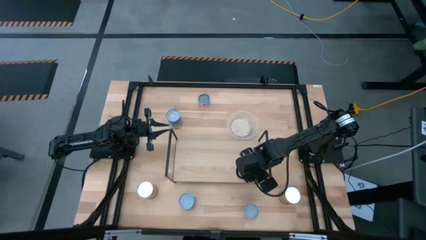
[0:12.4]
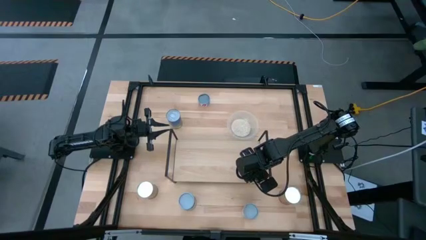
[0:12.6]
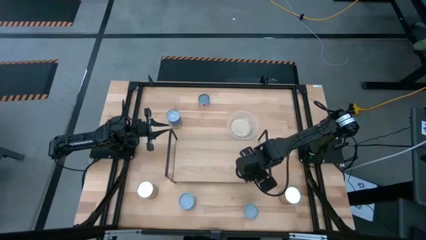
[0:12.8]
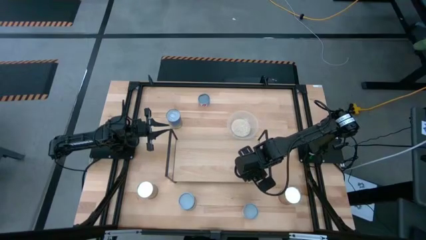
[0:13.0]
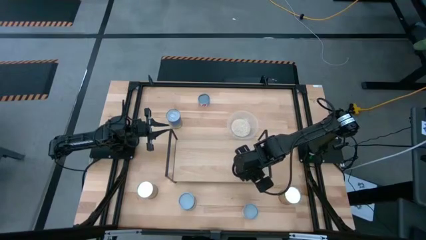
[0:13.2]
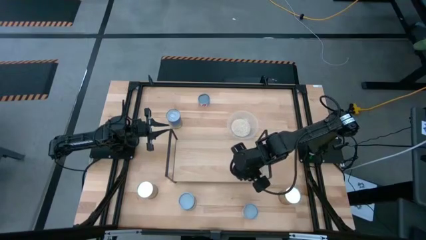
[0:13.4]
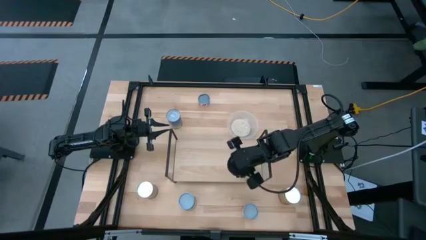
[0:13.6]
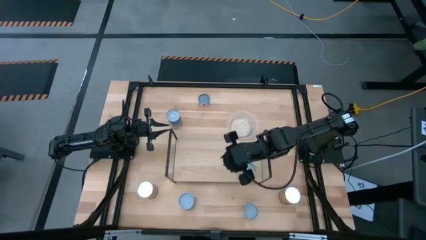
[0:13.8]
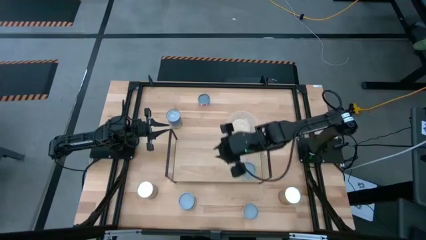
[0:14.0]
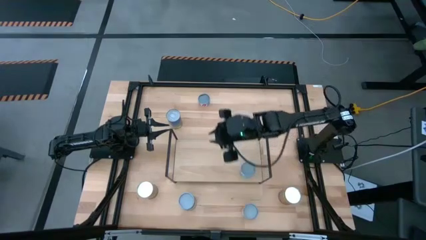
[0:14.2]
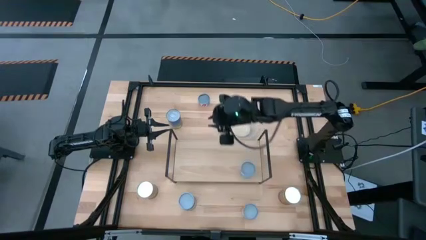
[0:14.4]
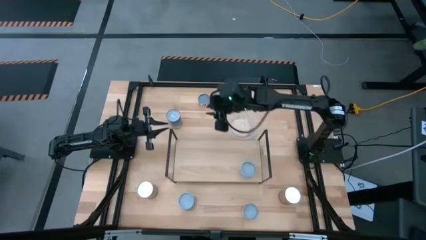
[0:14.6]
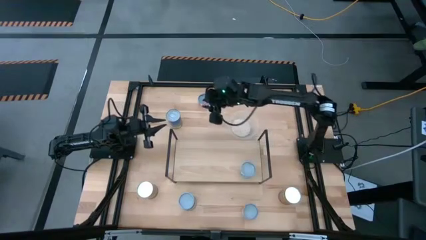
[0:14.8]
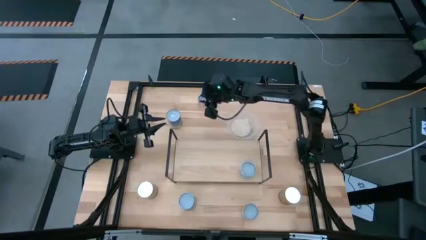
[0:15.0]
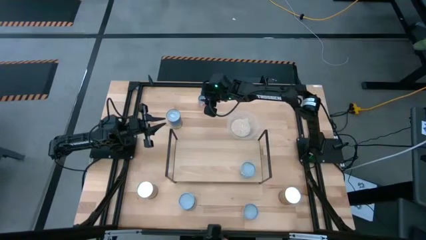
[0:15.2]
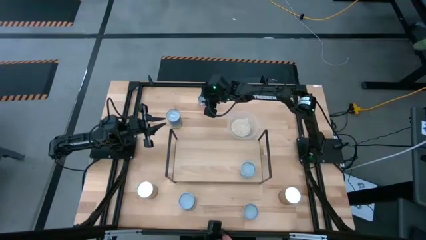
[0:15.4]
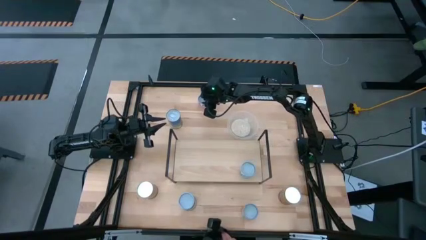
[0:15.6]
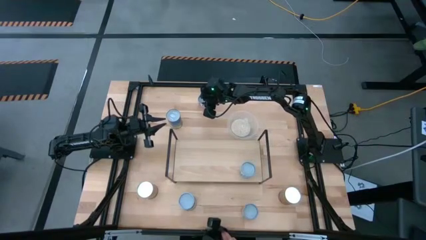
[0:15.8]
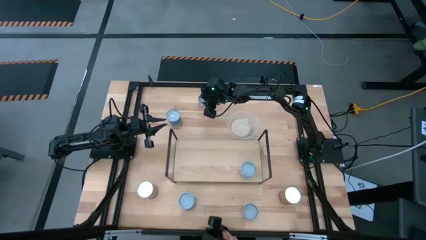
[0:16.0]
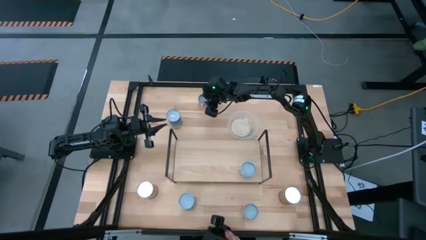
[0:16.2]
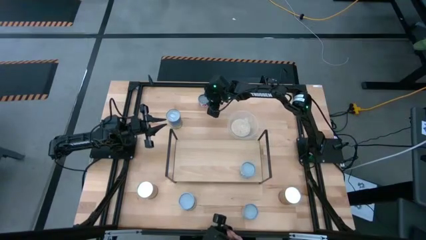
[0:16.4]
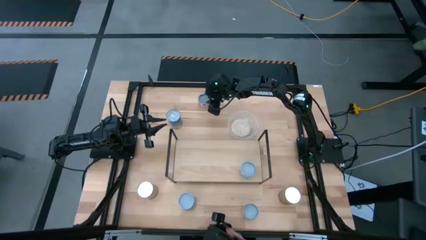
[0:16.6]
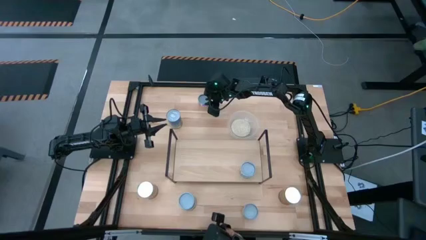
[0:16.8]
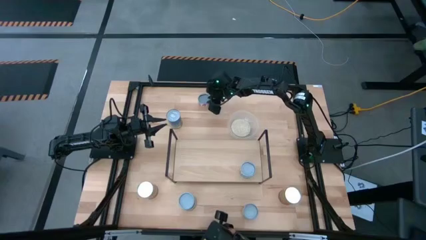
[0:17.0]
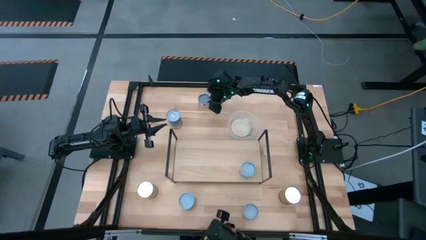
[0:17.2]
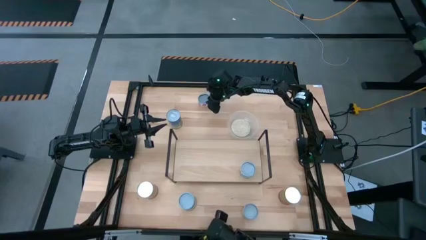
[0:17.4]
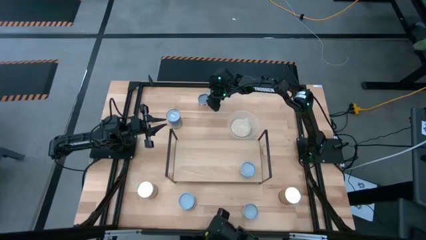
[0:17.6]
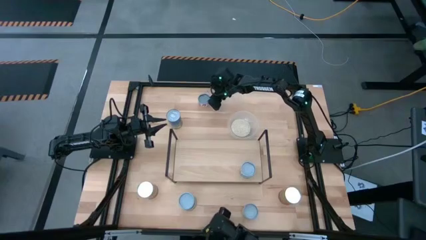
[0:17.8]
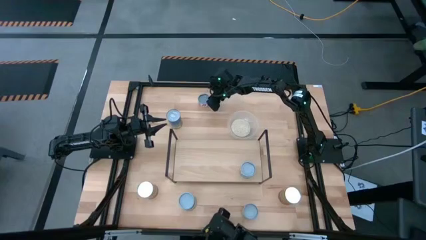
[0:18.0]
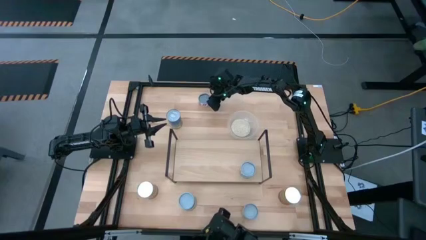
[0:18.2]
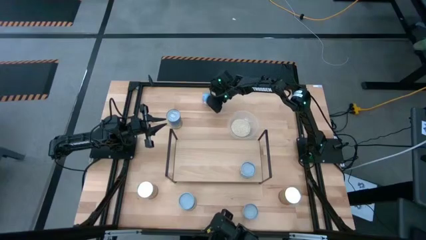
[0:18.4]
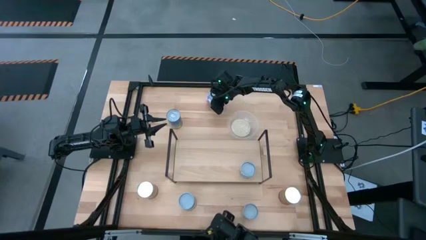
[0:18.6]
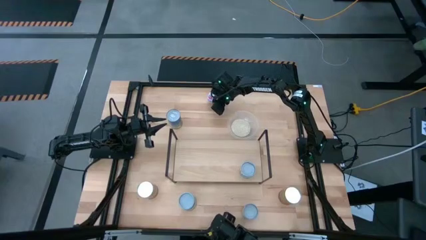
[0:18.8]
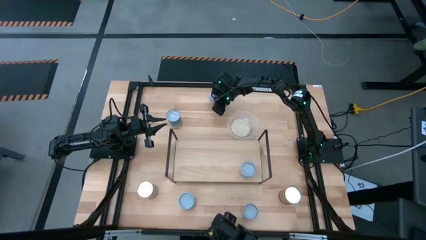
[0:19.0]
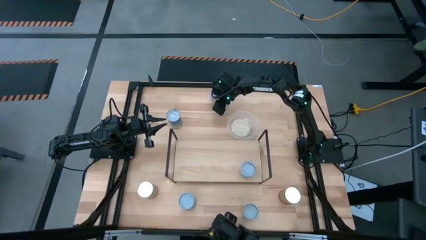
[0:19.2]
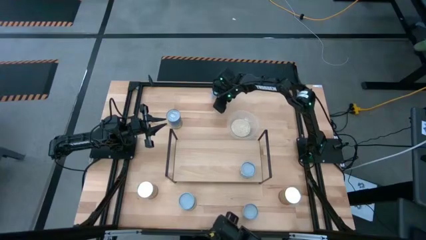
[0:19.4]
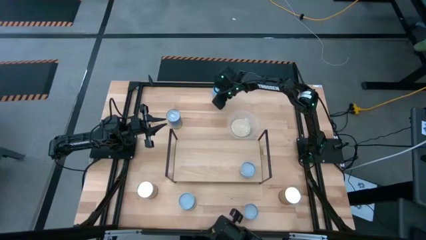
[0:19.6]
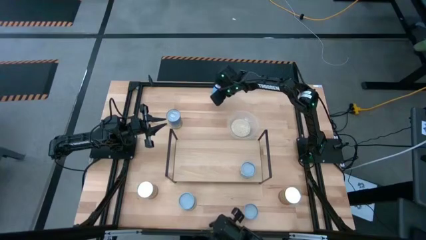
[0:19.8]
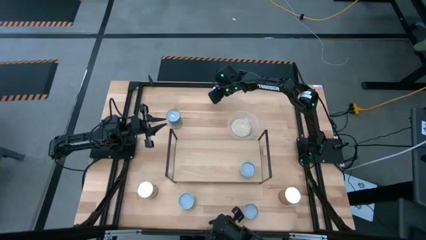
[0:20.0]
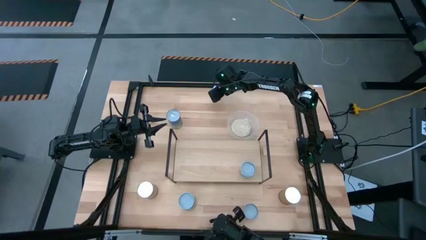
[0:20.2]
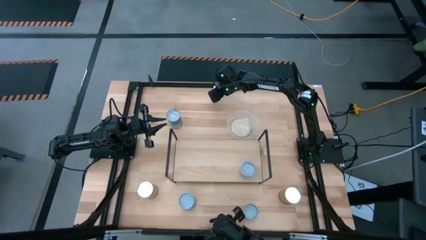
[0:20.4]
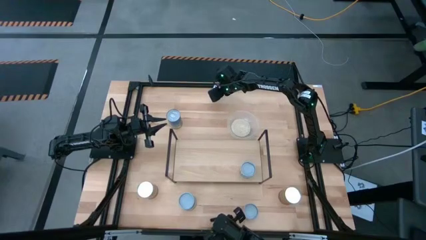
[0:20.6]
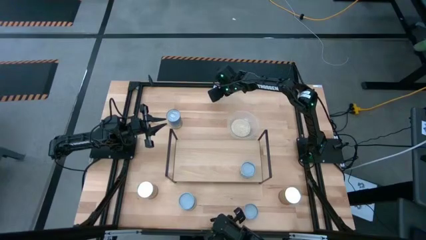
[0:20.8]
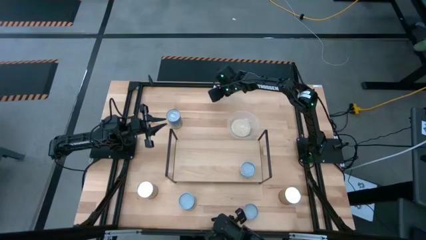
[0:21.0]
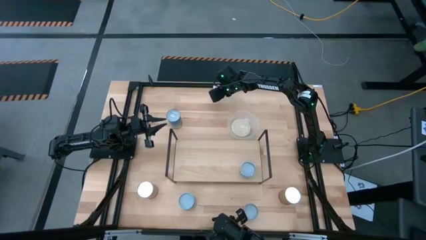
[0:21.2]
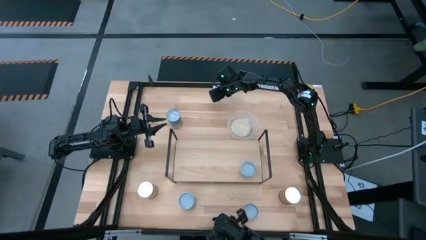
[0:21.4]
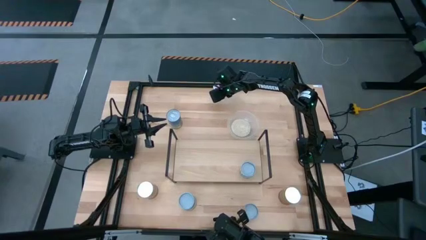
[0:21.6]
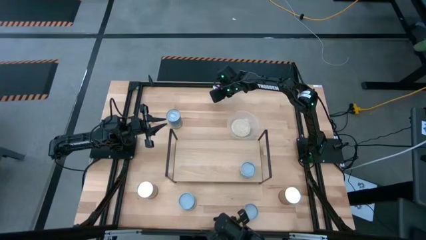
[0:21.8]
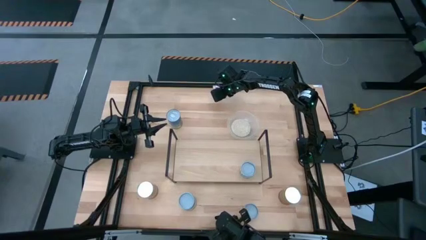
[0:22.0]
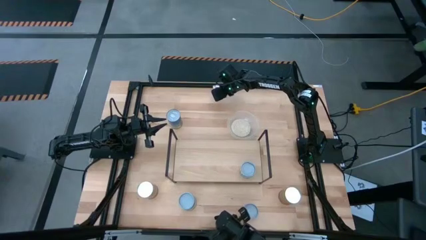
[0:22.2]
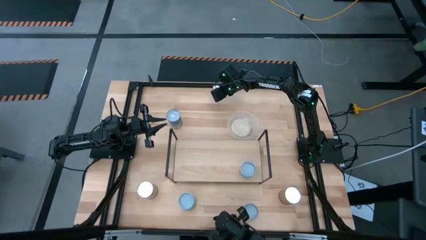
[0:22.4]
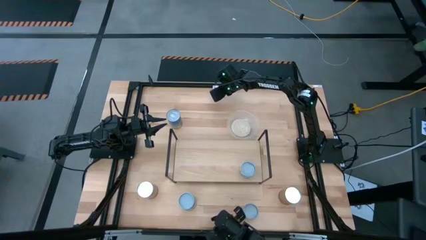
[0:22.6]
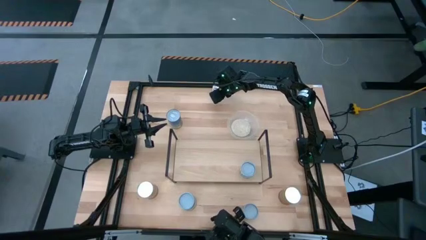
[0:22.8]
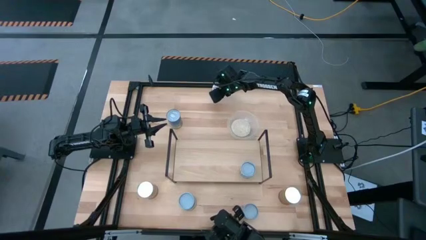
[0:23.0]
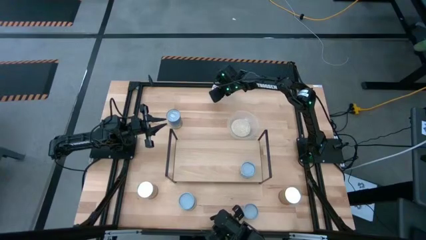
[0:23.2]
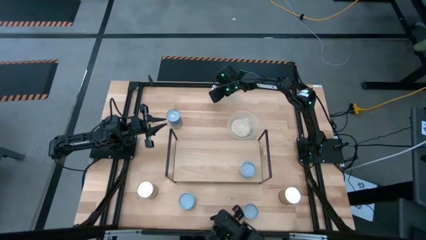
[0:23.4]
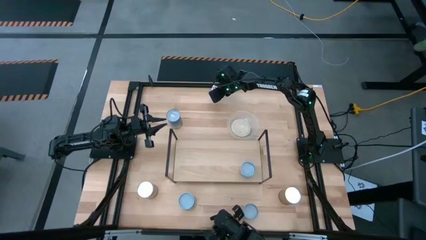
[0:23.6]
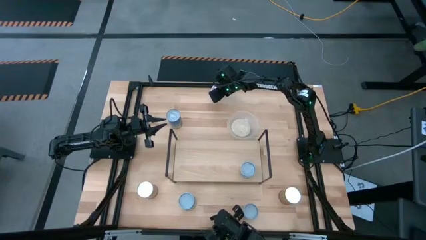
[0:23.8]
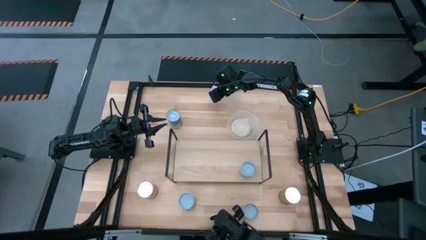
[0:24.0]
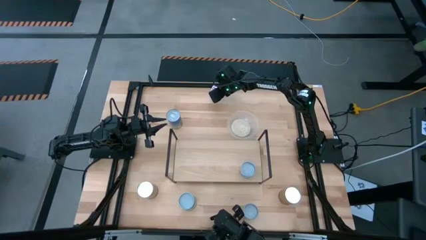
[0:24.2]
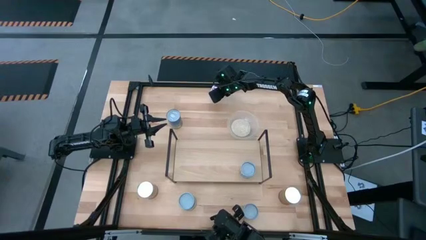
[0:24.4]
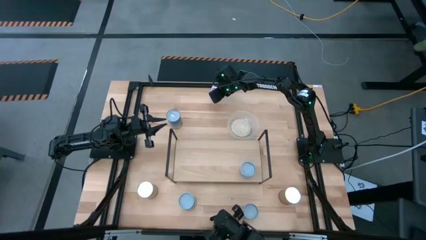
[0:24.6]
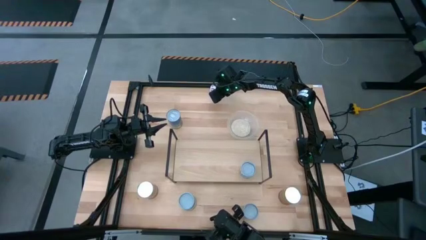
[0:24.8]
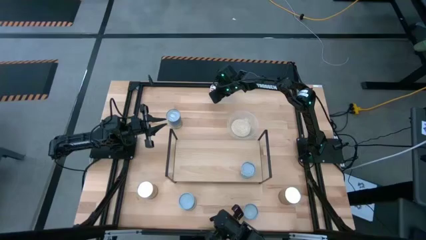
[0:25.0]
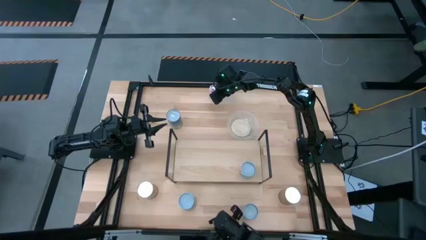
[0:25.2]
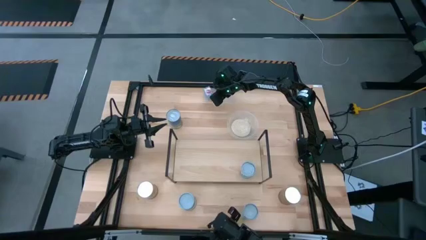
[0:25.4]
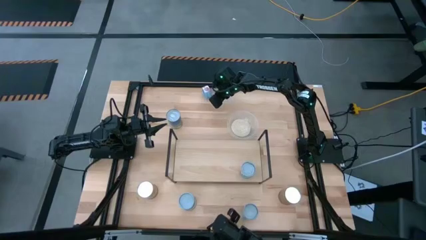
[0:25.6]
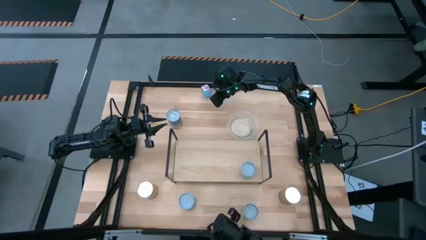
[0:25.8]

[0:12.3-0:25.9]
Task: Pick and place cans onto a shelf
Put the canned tuna on the shelf
